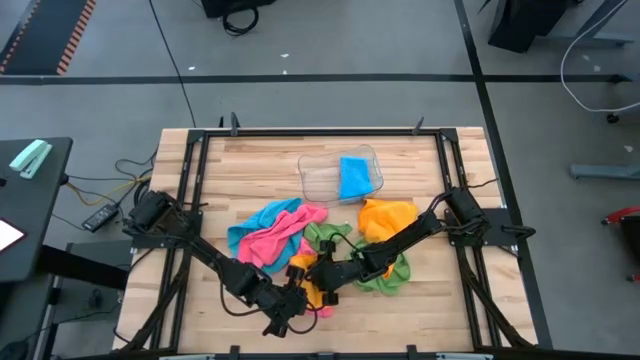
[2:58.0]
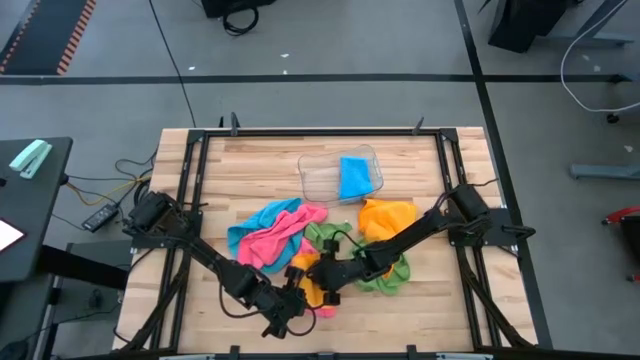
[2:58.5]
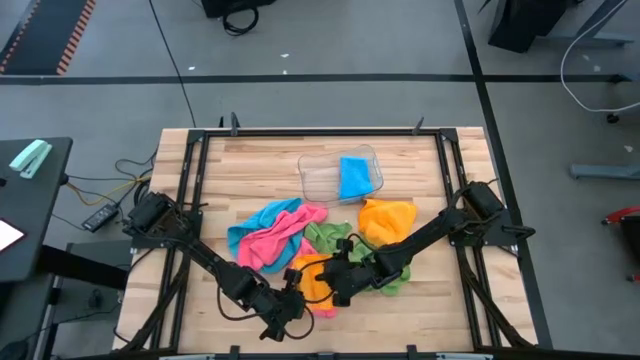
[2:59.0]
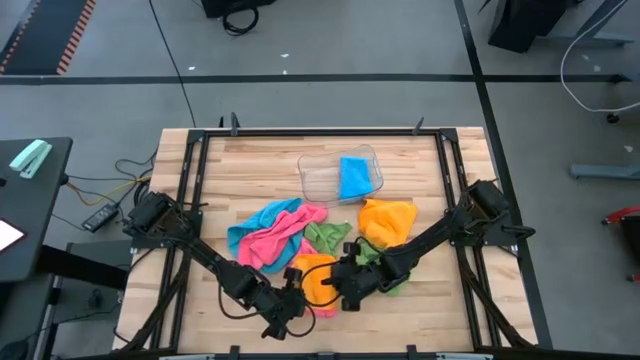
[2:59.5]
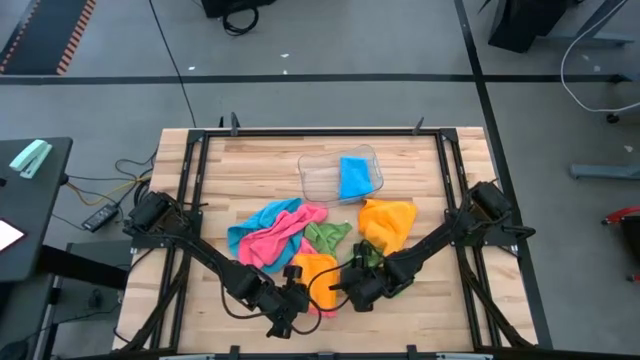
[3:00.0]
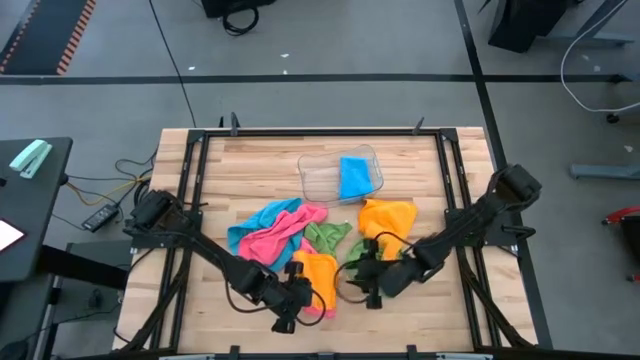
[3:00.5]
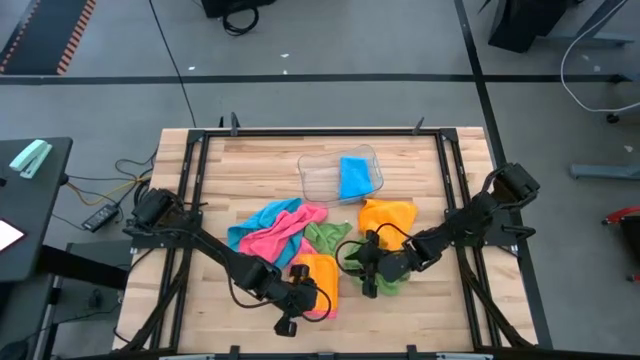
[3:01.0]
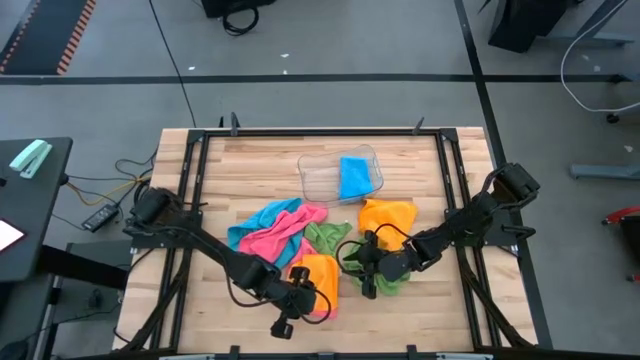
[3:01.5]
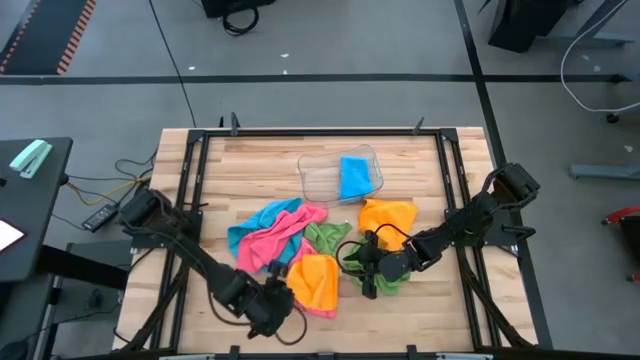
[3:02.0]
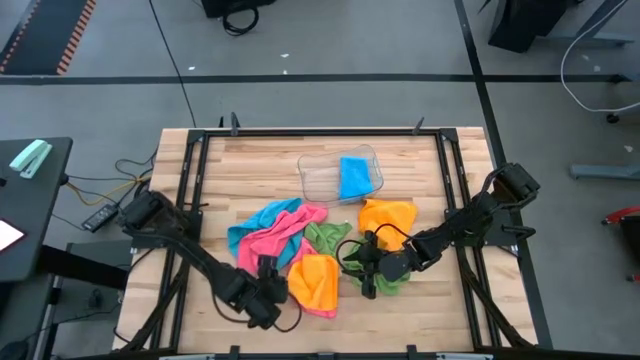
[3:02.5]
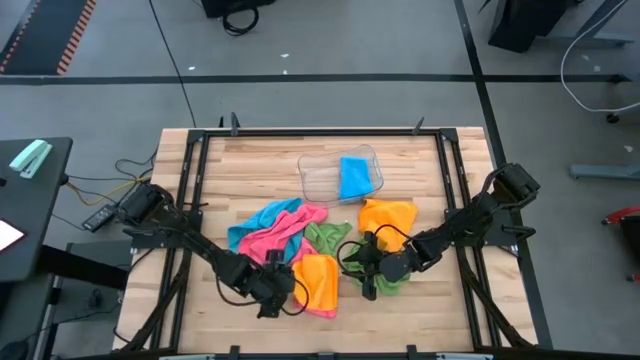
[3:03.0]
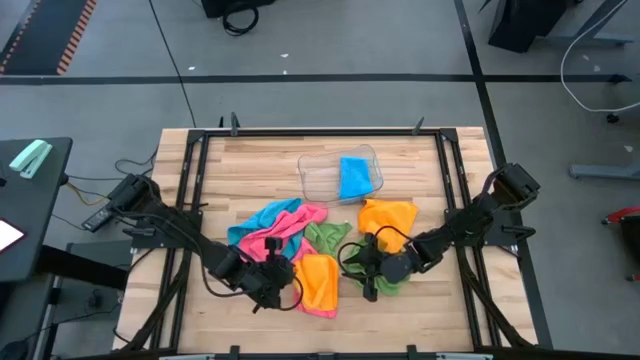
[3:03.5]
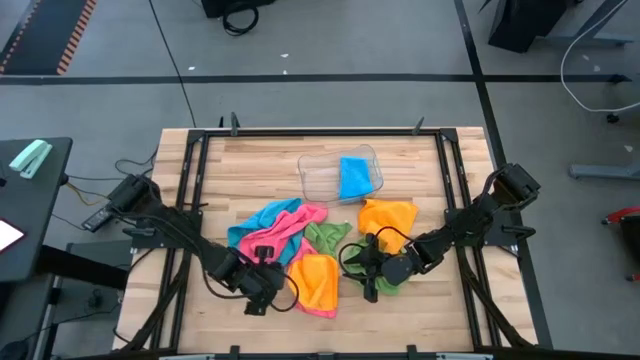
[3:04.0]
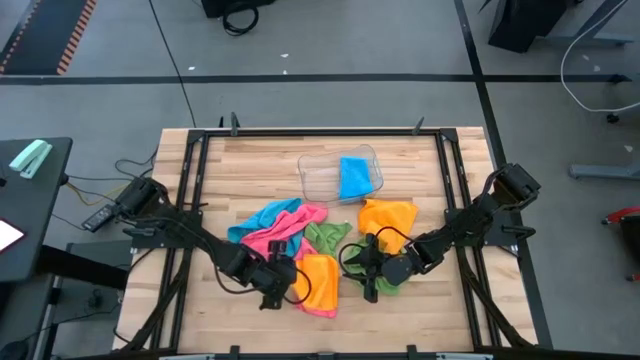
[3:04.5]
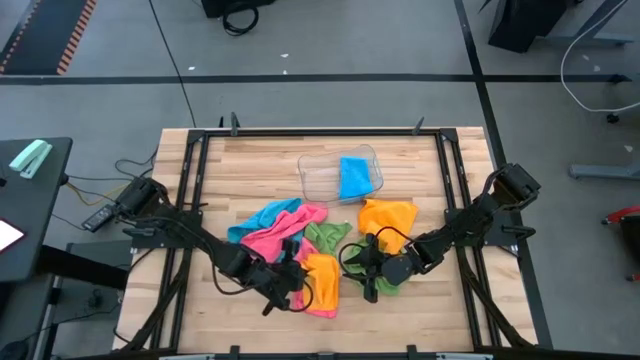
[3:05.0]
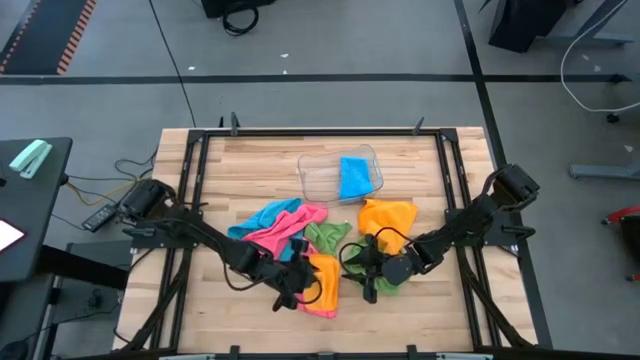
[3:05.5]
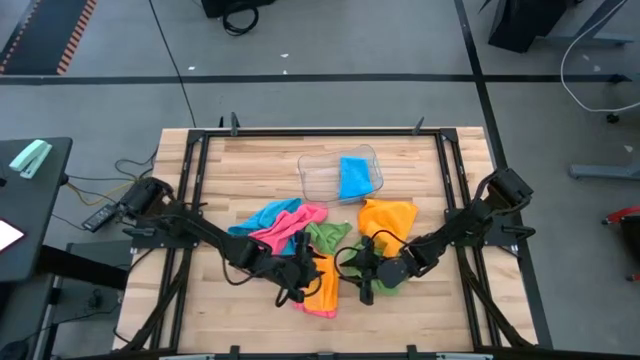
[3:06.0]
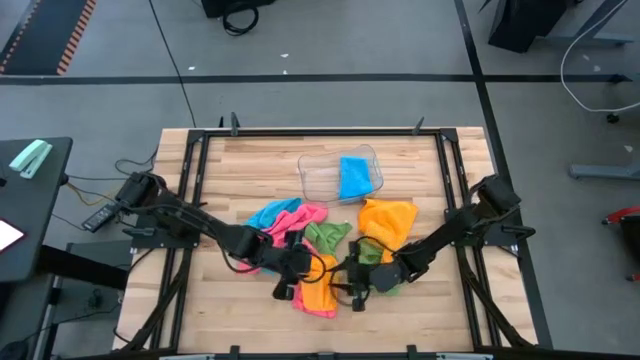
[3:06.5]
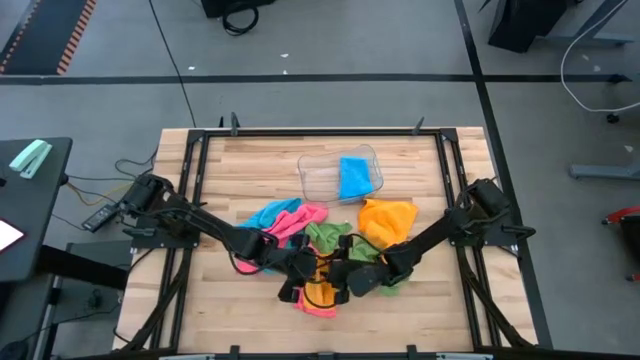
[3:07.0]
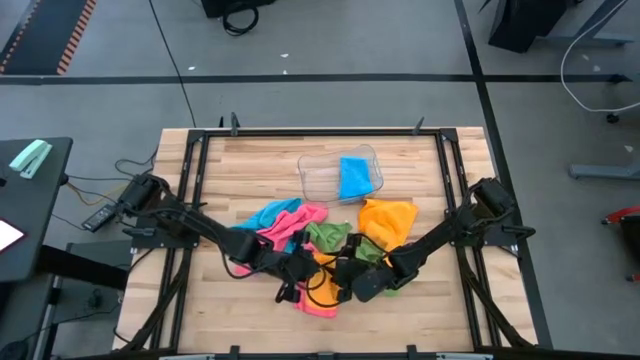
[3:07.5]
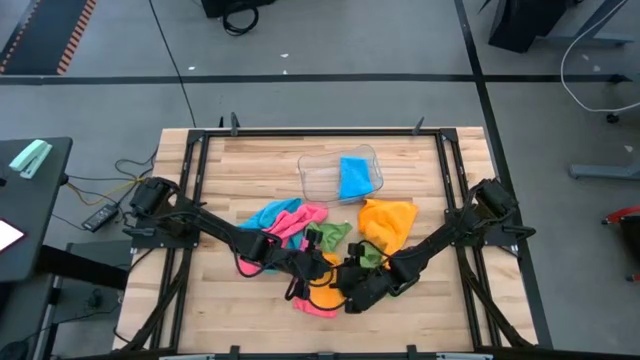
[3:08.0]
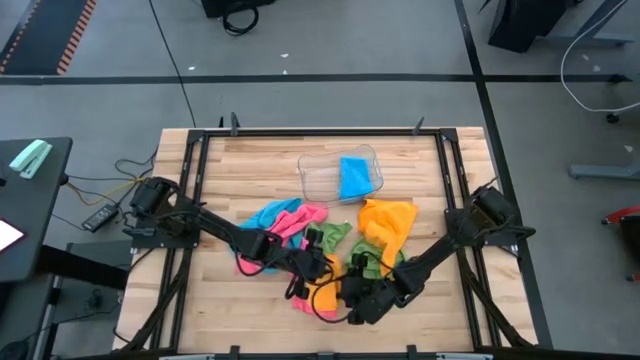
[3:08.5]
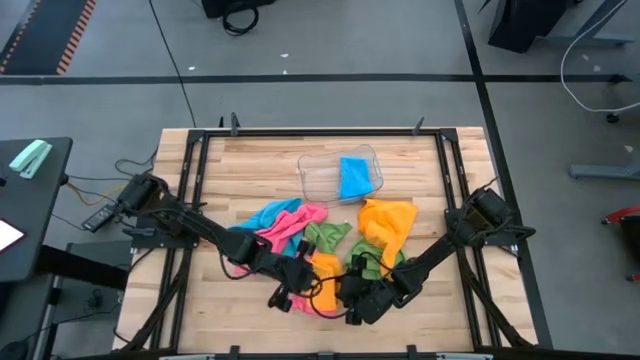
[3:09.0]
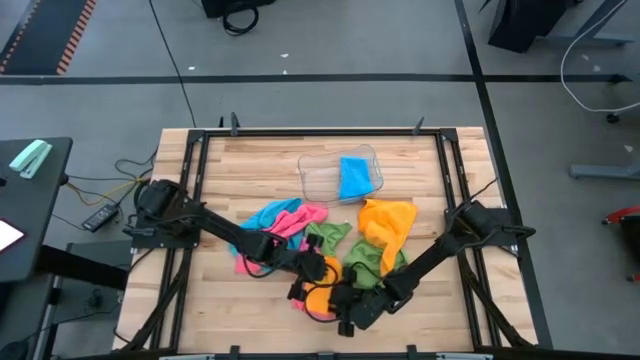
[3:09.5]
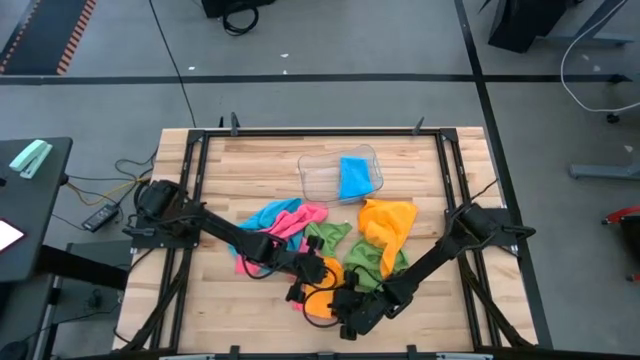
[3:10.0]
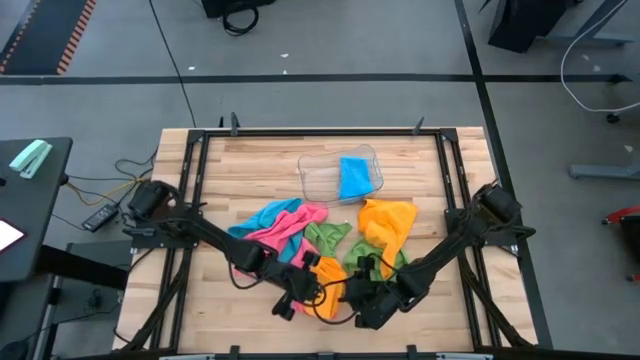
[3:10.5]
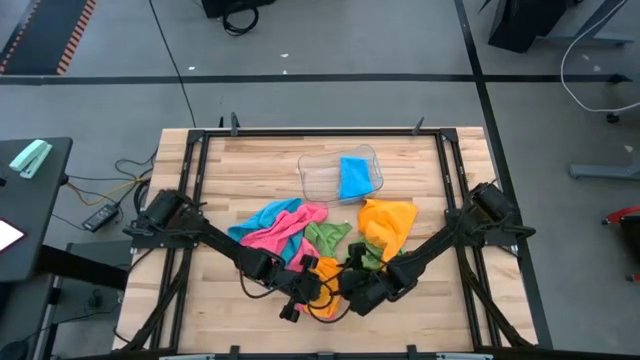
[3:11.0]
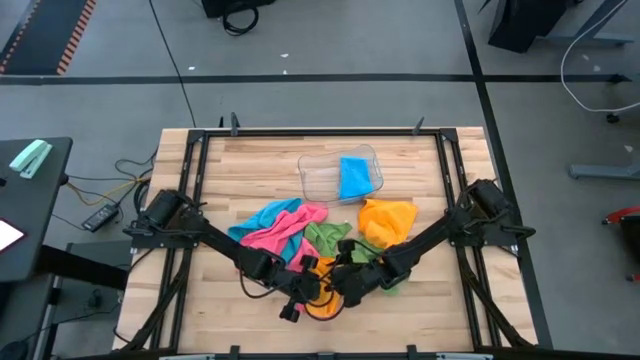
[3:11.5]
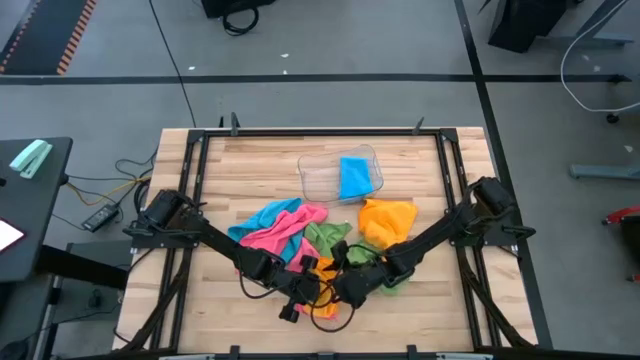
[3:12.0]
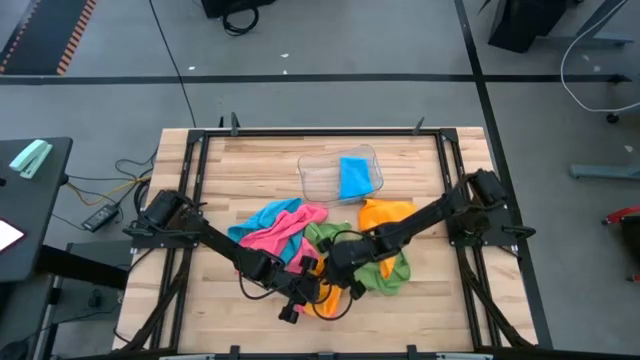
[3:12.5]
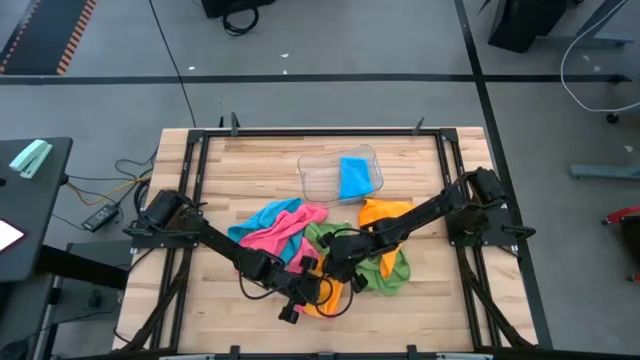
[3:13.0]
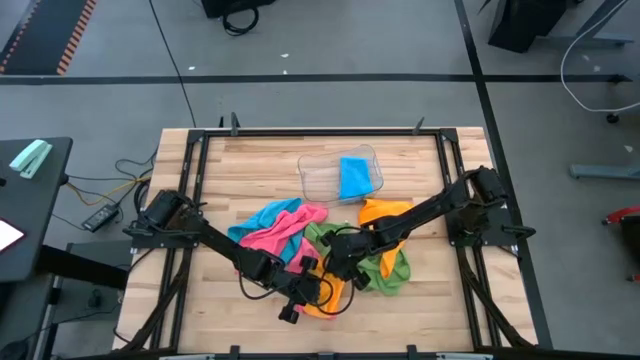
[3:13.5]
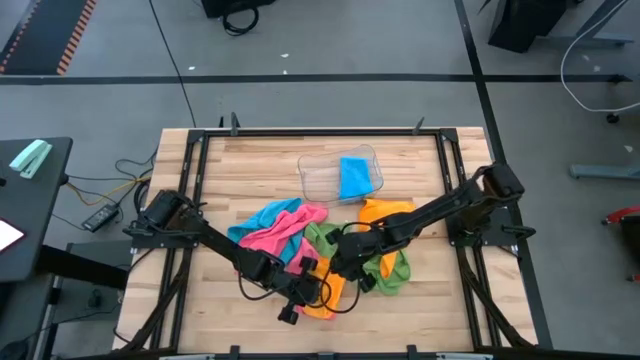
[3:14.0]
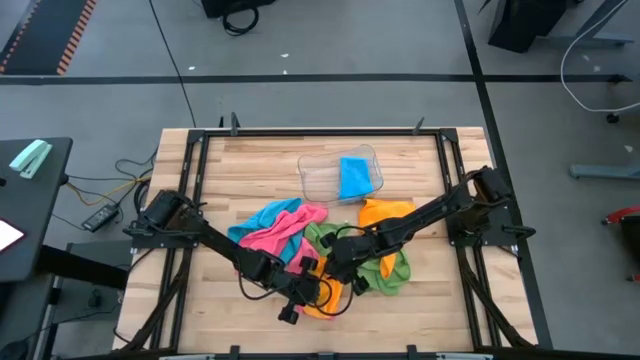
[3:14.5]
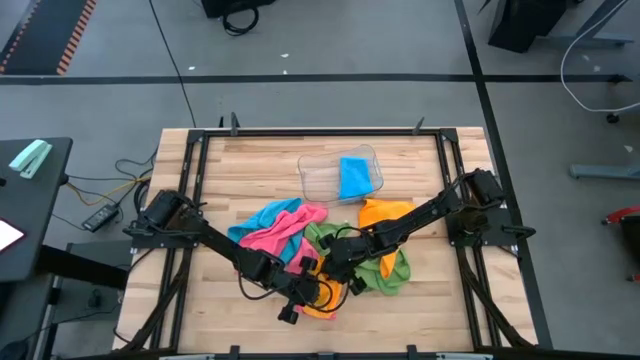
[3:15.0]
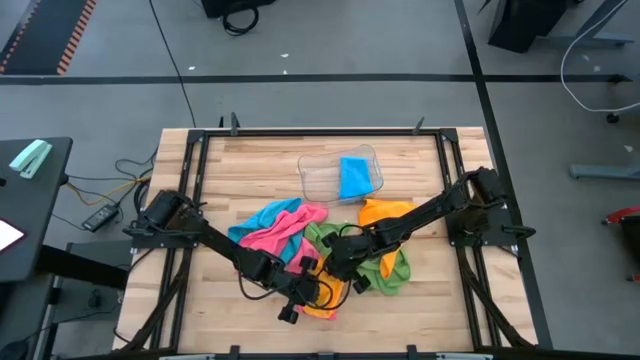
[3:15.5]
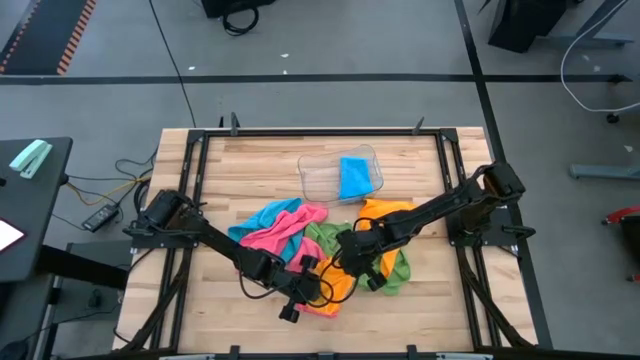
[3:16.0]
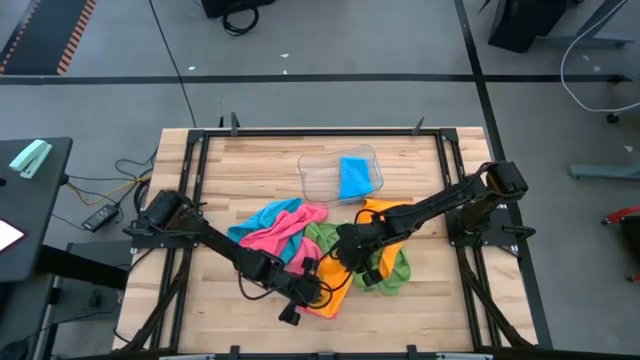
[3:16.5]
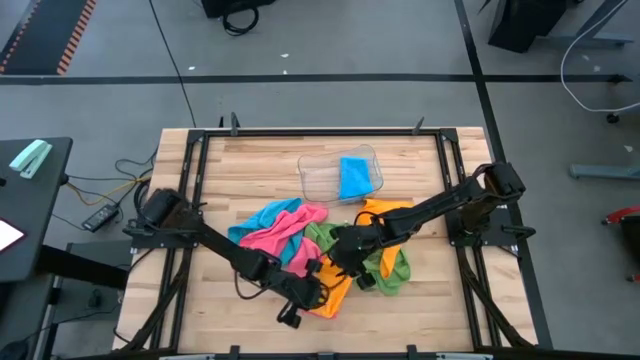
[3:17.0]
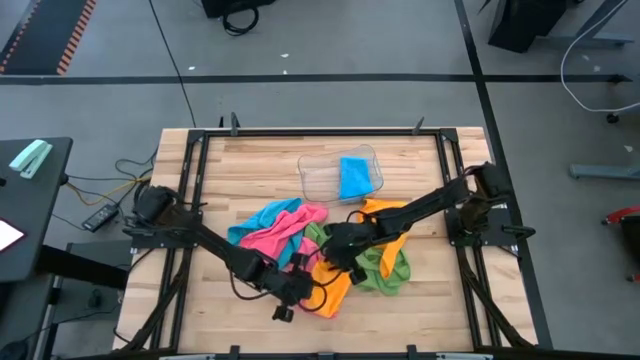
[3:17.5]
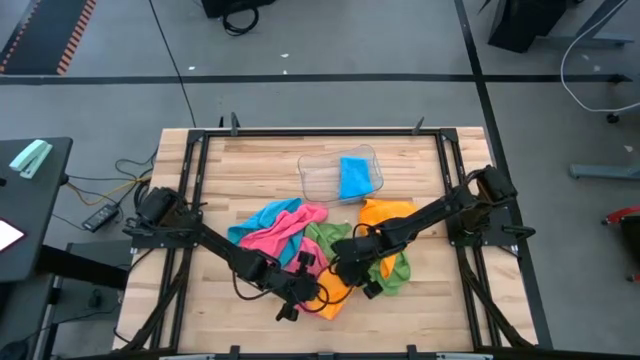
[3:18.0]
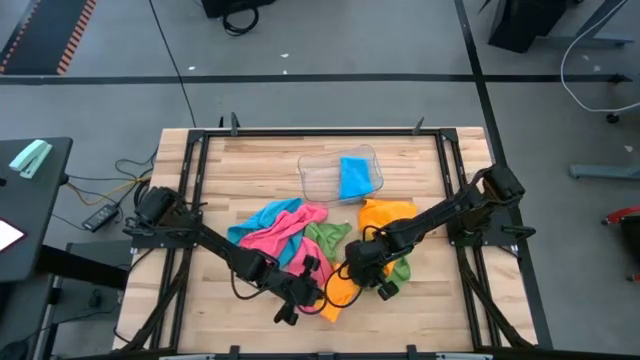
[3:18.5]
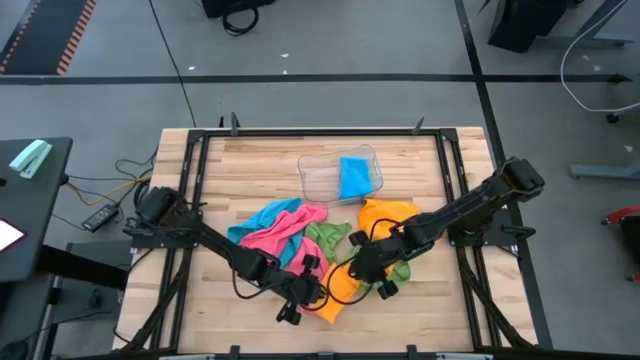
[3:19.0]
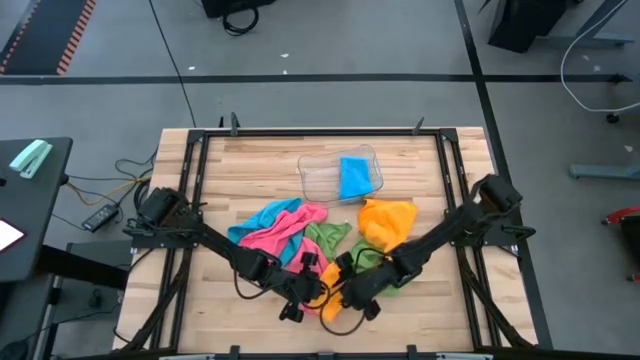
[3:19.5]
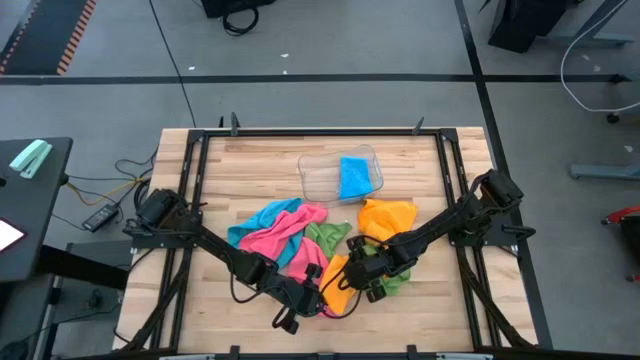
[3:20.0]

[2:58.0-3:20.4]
Task: Fold microfiber towels
Fold the left yellow microfiber cloth
